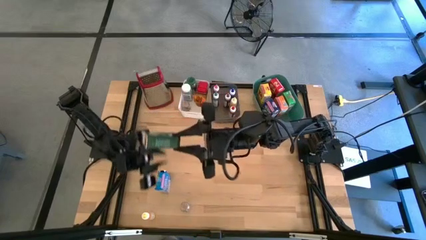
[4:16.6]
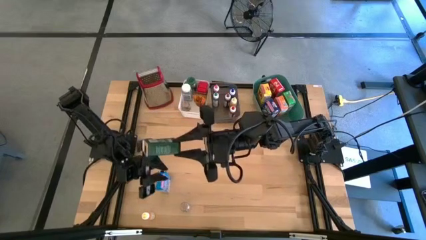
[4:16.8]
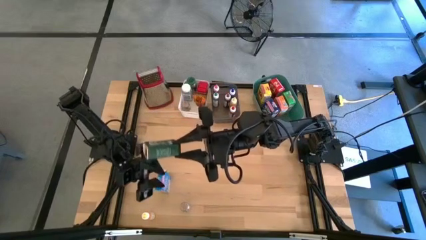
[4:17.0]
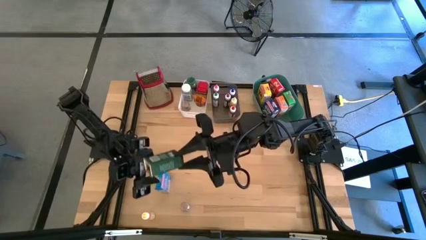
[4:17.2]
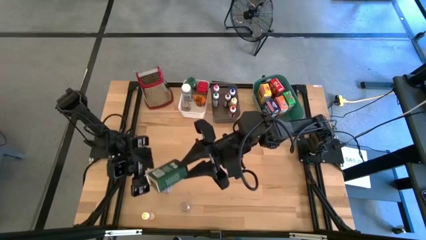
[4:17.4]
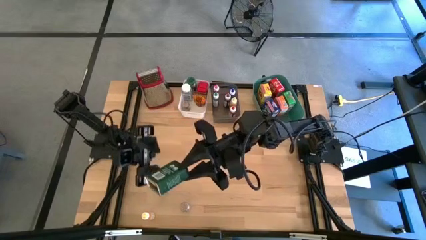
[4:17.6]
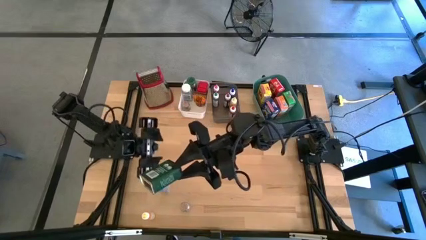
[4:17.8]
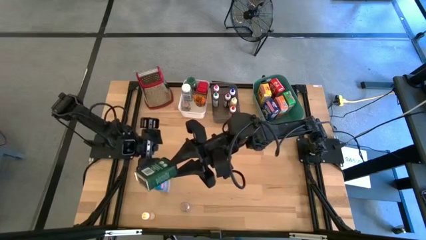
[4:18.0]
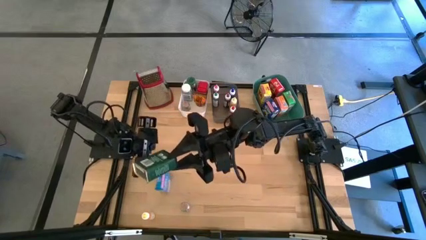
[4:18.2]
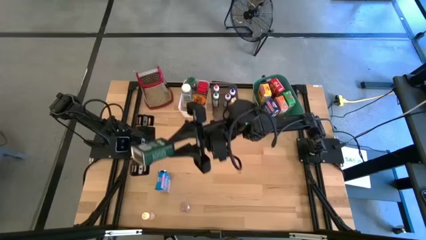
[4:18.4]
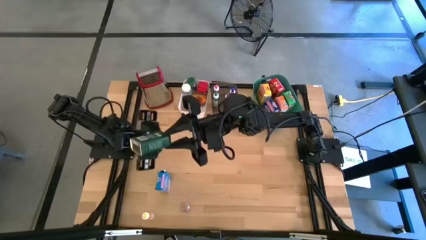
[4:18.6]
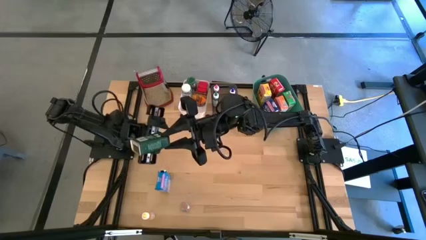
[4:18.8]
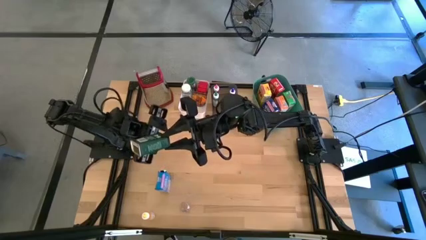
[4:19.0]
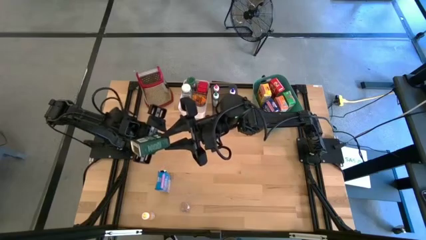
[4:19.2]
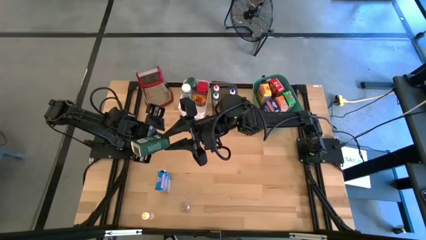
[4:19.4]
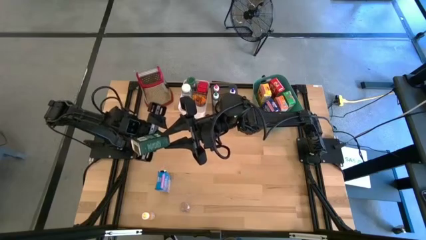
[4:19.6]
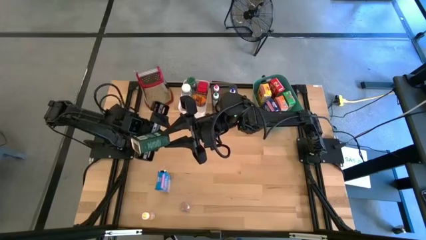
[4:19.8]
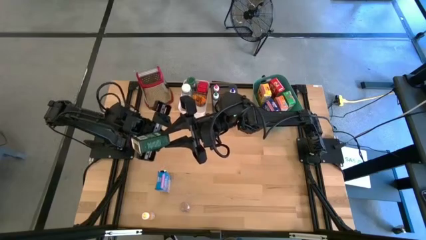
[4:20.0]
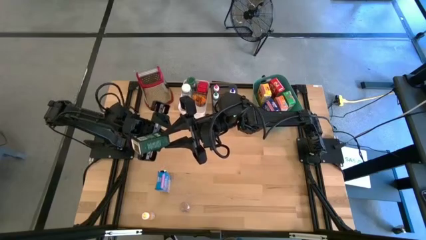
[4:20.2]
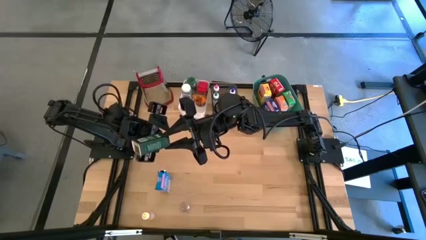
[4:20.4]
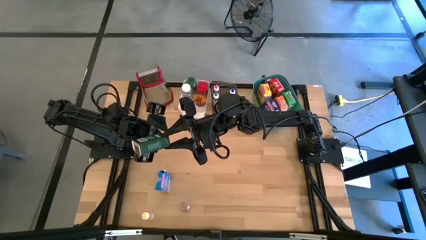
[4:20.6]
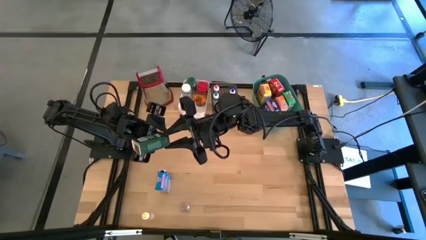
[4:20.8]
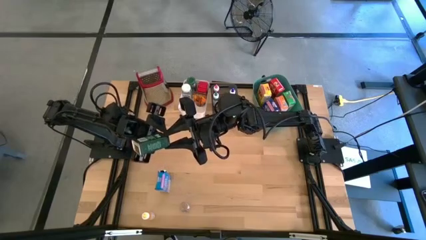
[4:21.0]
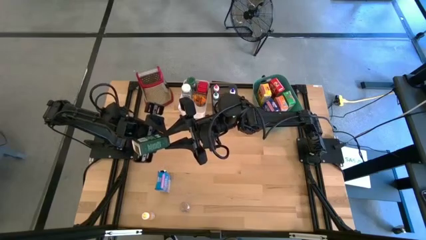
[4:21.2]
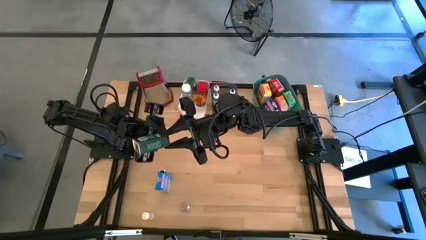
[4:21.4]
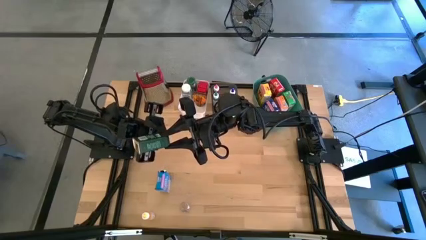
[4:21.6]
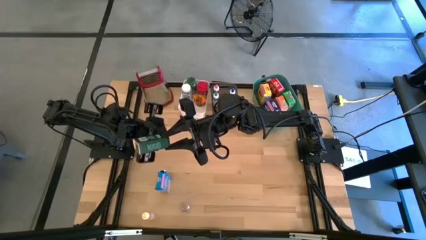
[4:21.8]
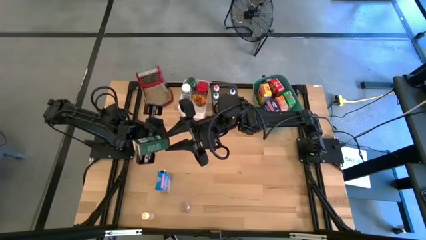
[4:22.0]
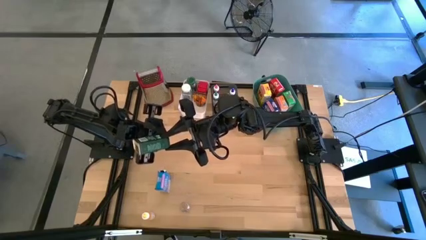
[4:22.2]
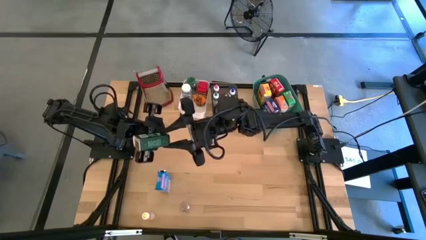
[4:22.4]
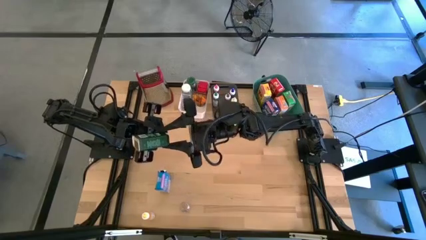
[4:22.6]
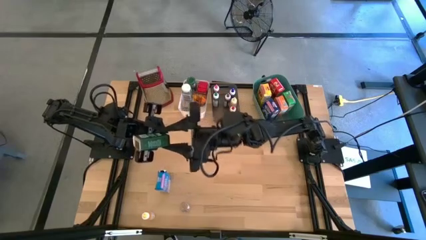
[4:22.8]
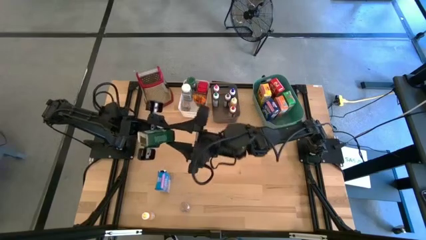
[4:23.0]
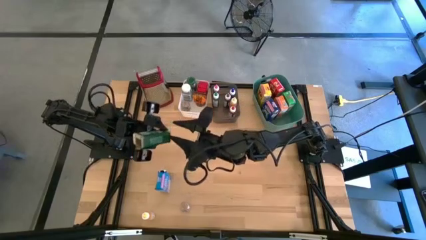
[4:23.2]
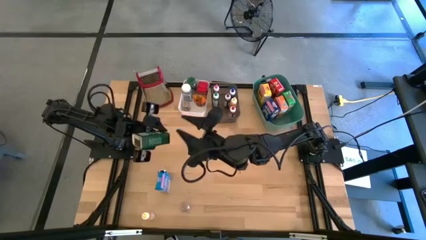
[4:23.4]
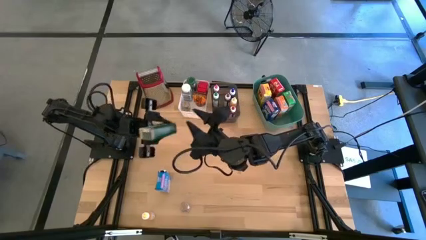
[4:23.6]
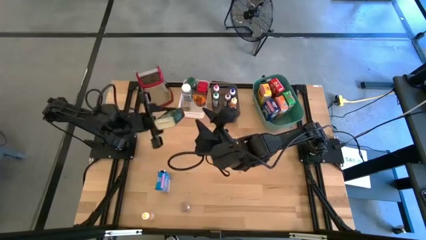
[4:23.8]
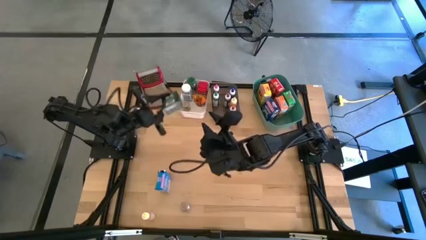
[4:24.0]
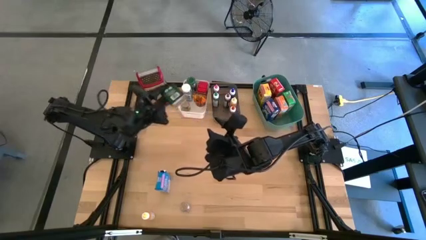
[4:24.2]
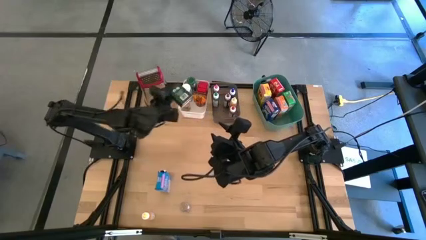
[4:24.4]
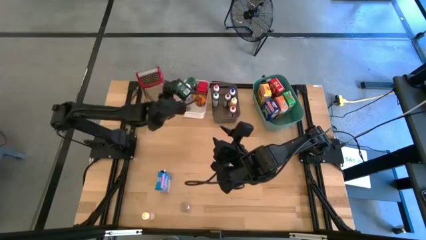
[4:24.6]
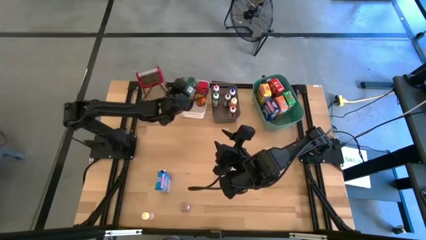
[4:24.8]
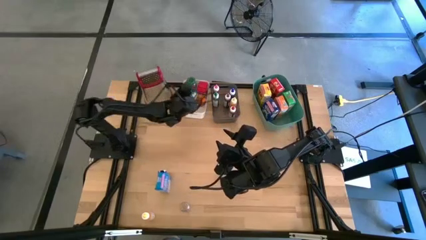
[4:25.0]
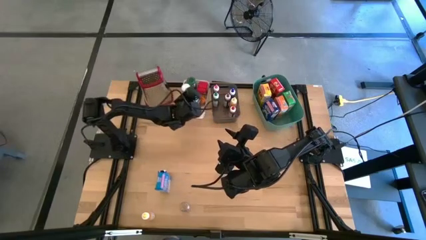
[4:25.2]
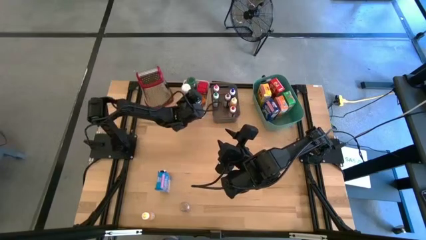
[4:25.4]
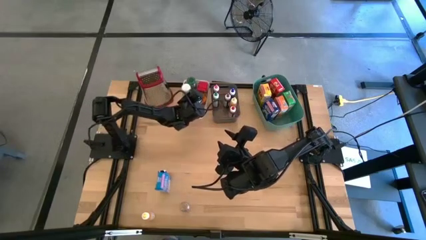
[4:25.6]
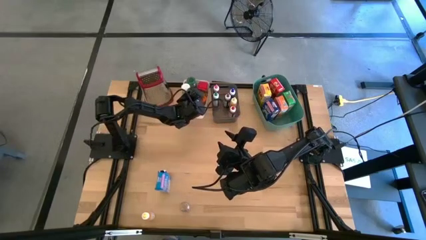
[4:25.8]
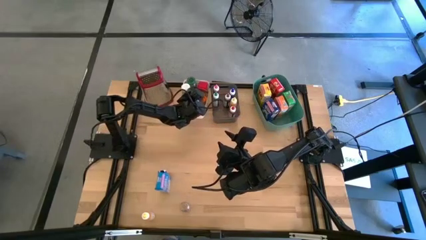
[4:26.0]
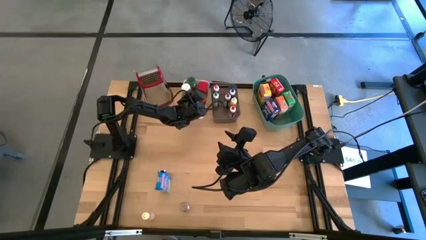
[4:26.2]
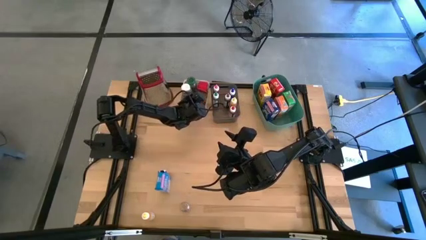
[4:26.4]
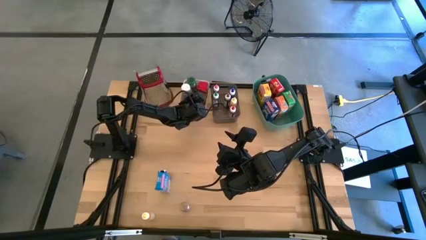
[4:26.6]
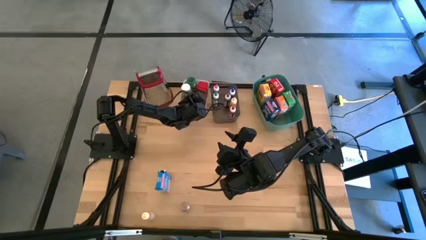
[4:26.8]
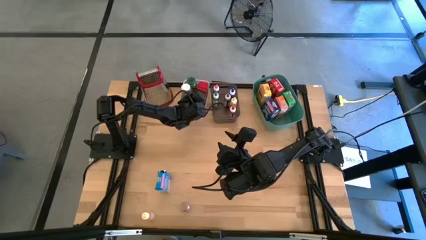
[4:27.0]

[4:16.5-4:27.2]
Task: Pick & Place Kitchen Items
Put the black seasoning can into the white bin

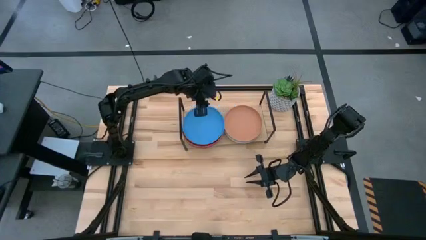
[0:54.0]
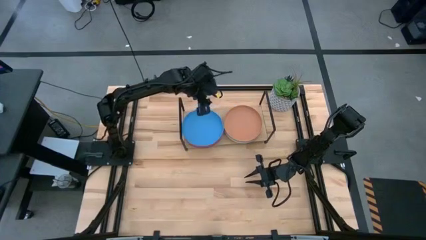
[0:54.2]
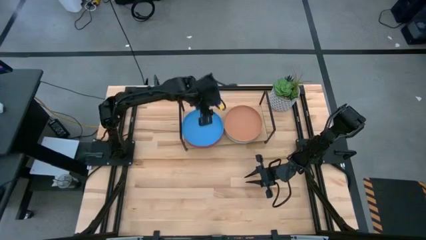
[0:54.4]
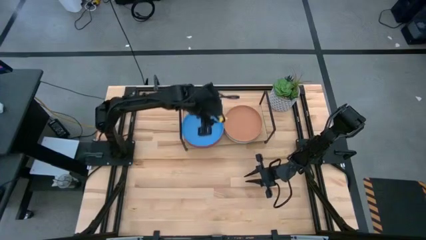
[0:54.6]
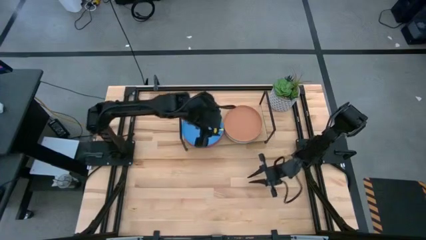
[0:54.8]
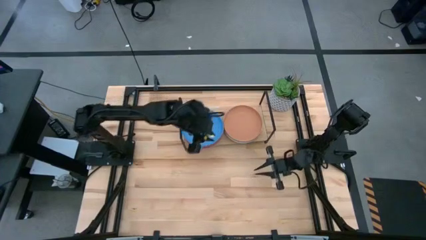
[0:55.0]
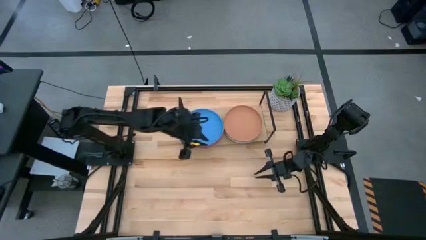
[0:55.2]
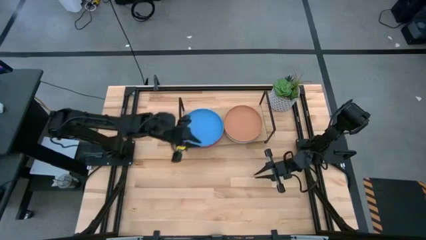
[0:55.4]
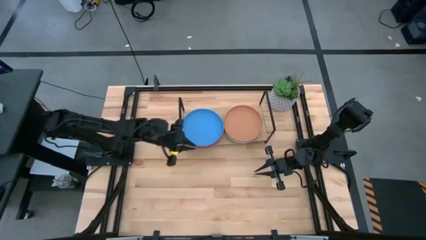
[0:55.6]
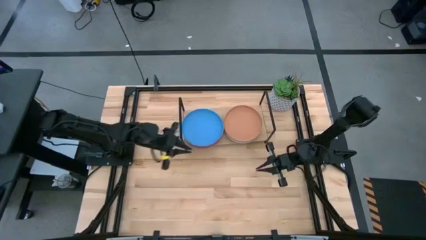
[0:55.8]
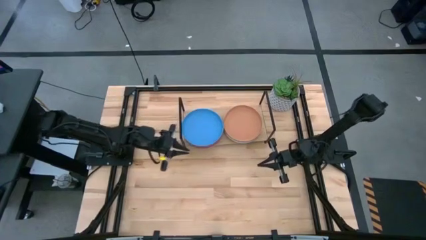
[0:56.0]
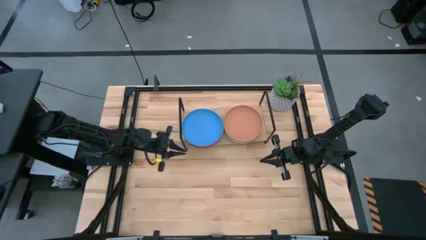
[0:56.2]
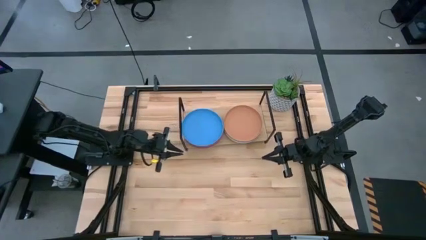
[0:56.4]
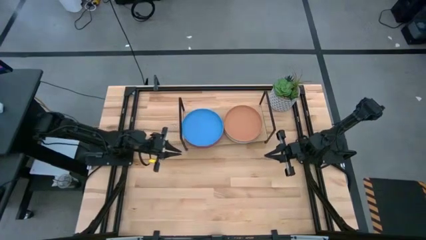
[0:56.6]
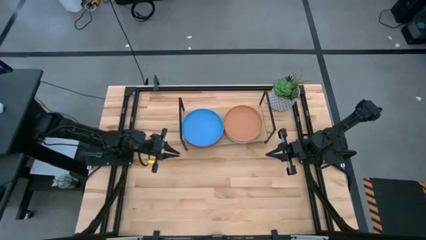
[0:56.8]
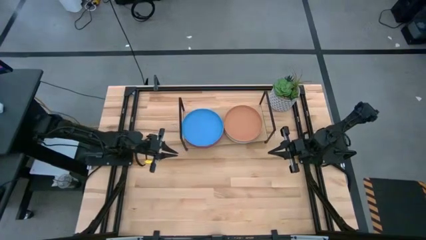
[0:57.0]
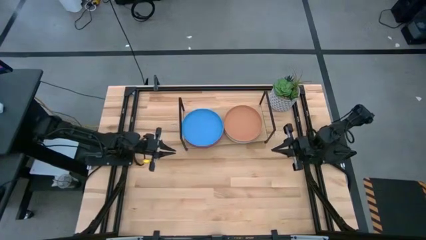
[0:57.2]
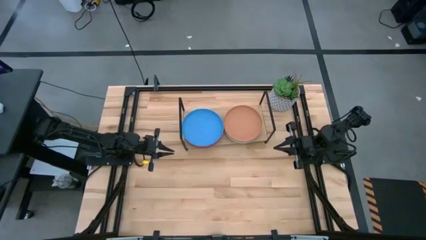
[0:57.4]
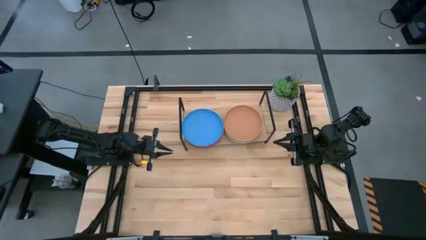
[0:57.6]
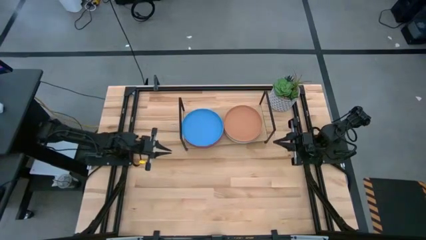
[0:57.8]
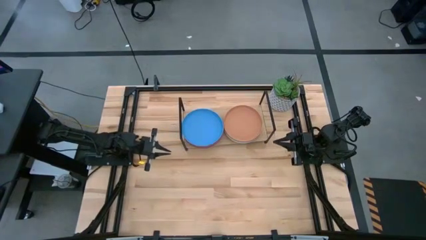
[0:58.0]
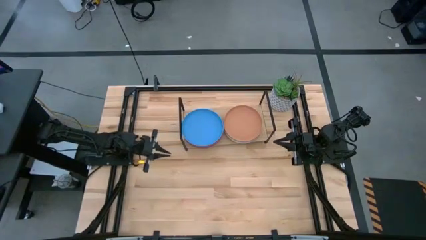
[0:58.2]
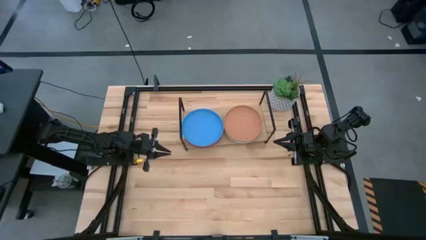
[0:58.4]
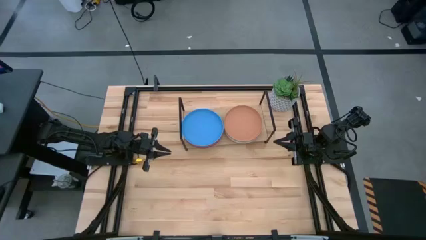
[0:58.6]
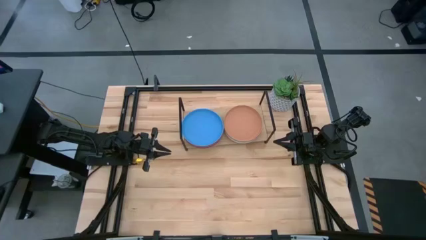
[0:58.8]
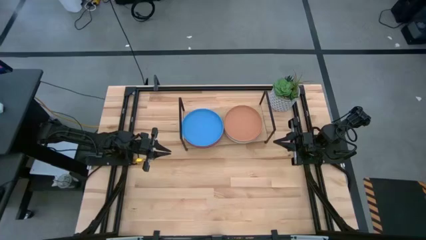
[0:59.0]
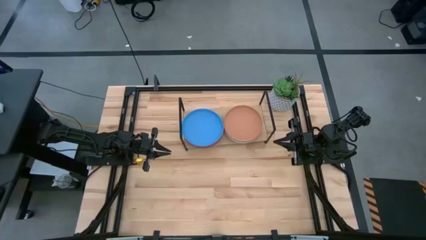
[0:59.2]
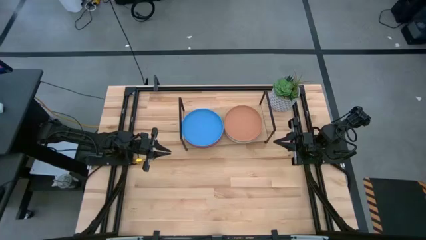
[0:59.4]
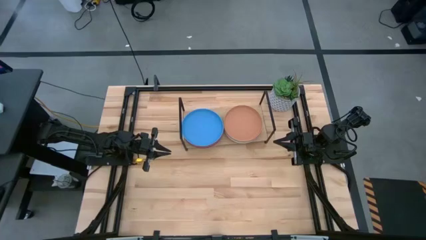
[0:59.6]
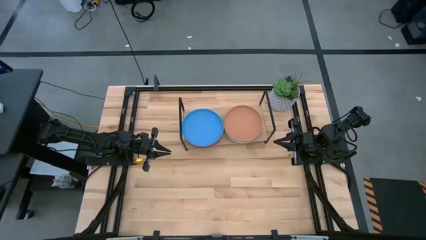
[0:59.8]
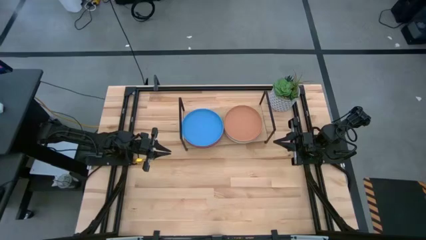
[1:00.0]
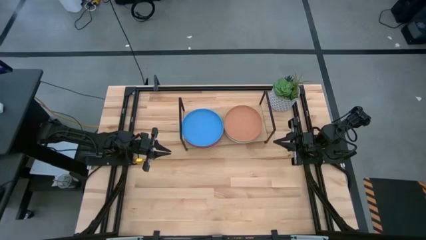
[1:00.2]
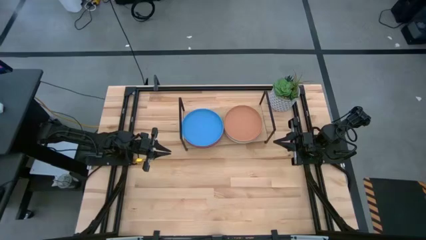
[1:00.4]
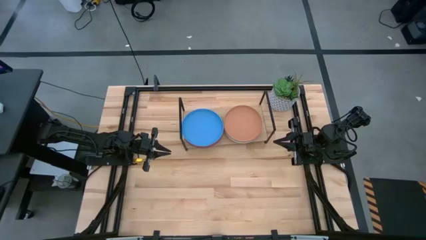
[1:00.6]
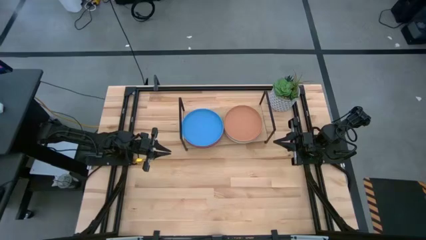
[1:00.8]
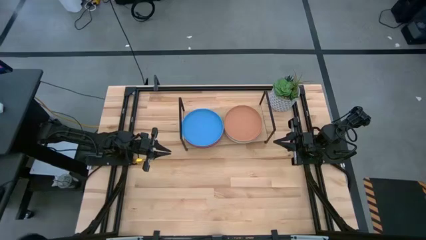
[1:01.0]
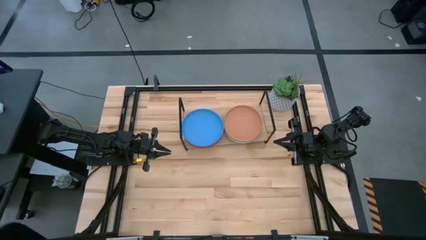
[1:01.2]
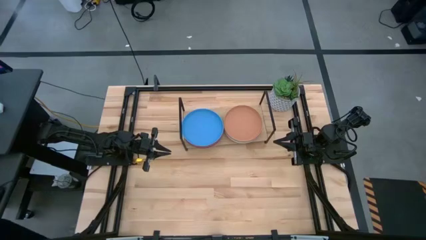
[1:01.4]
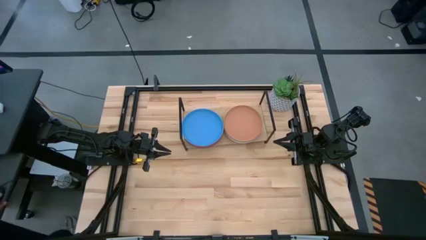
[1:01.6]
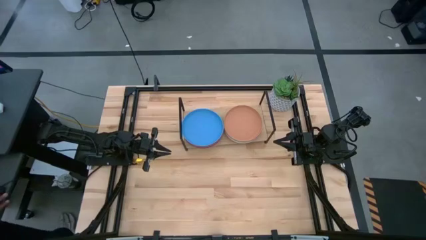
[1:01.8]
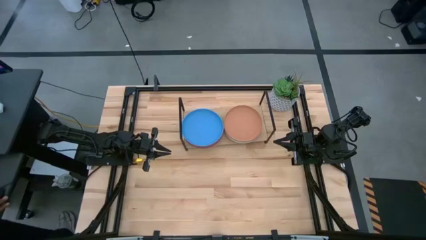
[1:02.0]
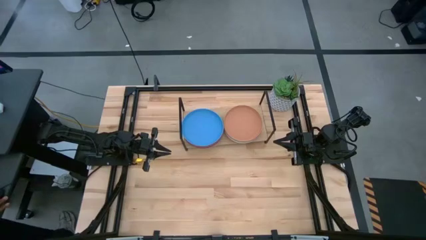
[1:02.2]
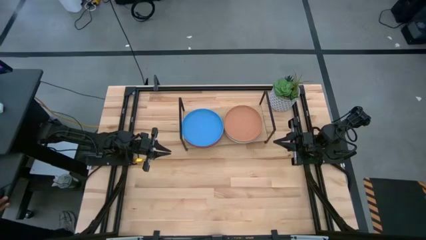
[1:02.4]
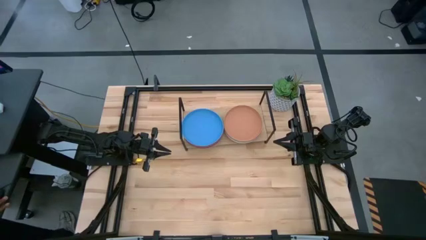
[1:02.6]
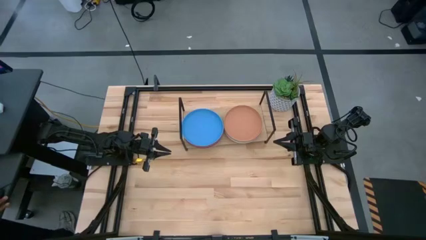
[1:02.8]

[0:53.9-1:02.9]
Task: Place and stack plates onto a shelf
Return to Home Position
